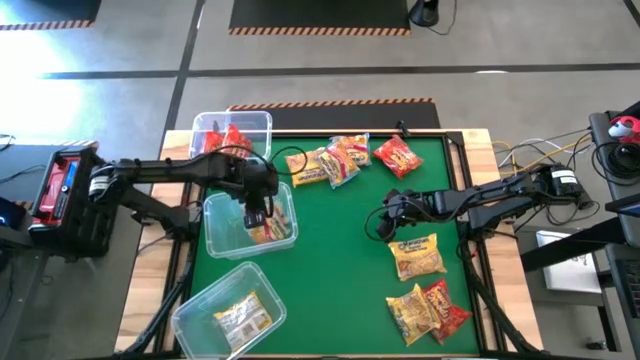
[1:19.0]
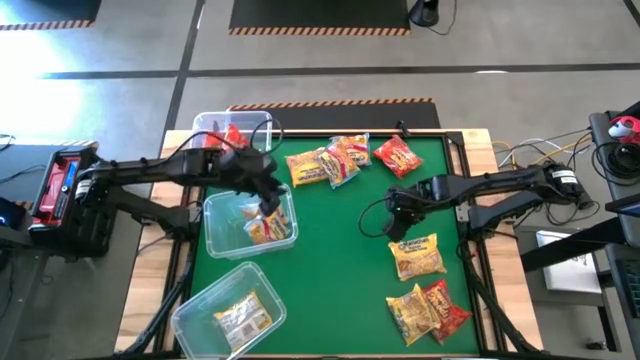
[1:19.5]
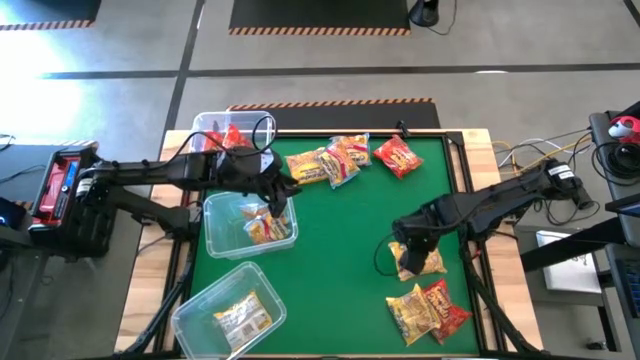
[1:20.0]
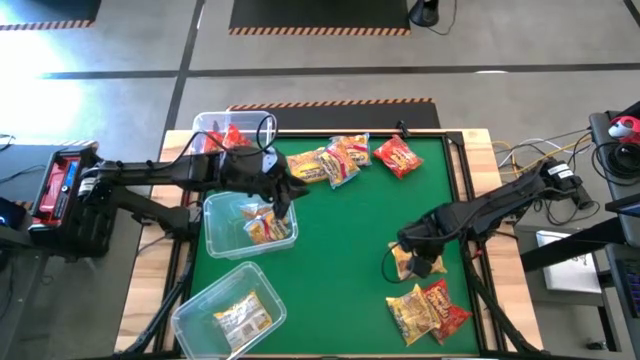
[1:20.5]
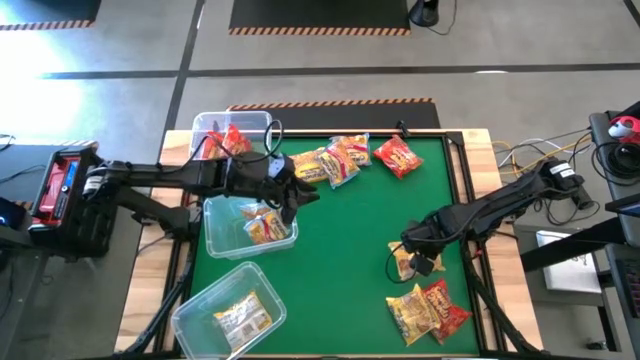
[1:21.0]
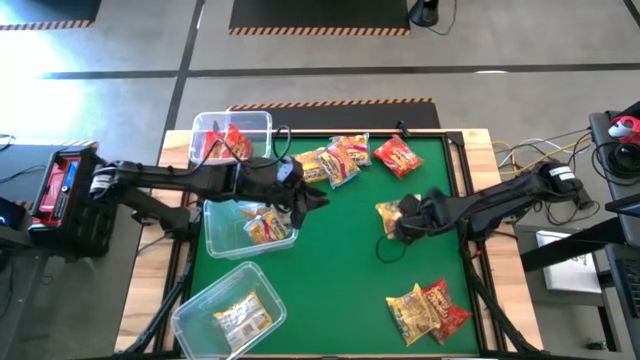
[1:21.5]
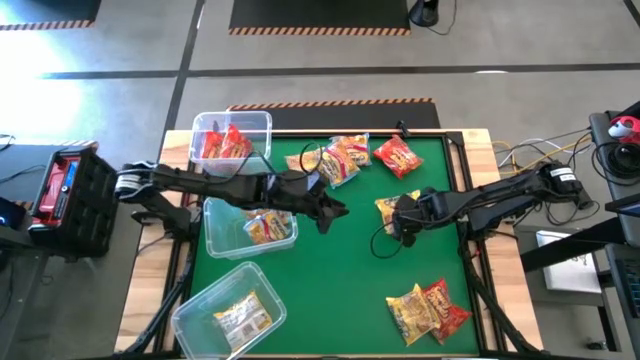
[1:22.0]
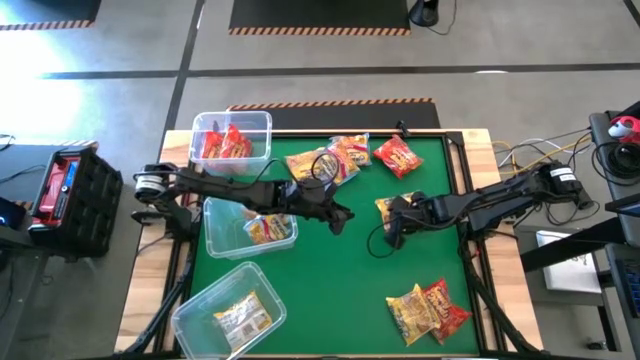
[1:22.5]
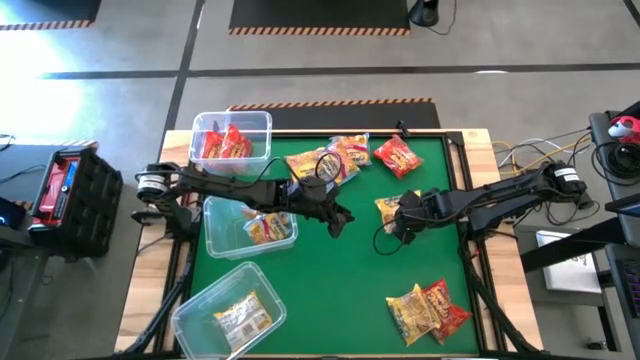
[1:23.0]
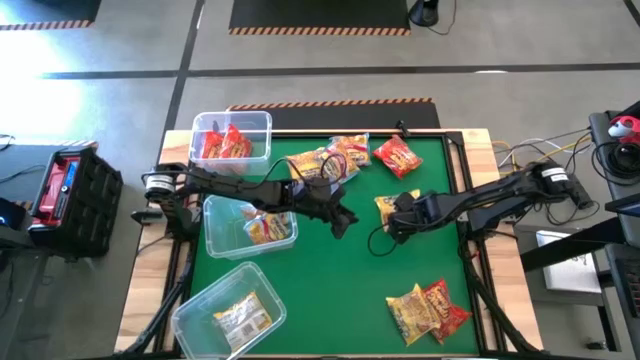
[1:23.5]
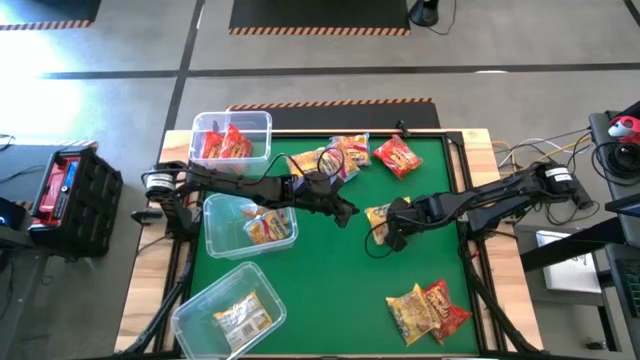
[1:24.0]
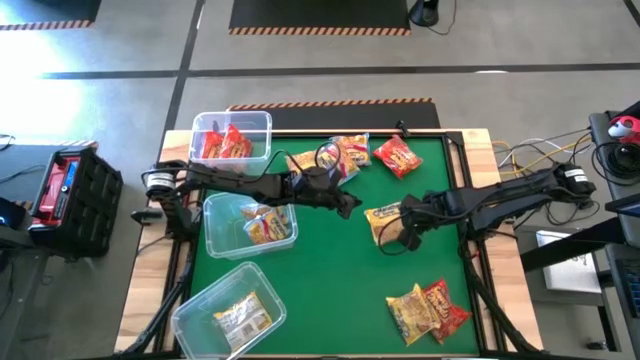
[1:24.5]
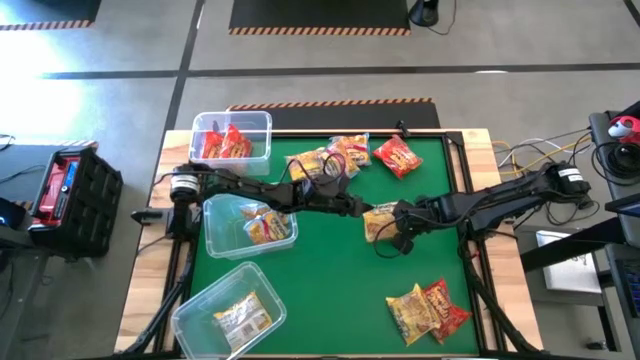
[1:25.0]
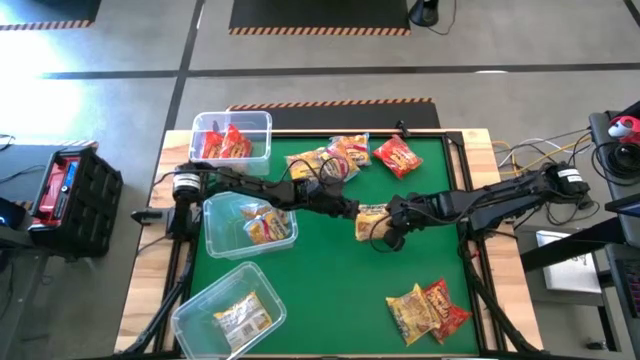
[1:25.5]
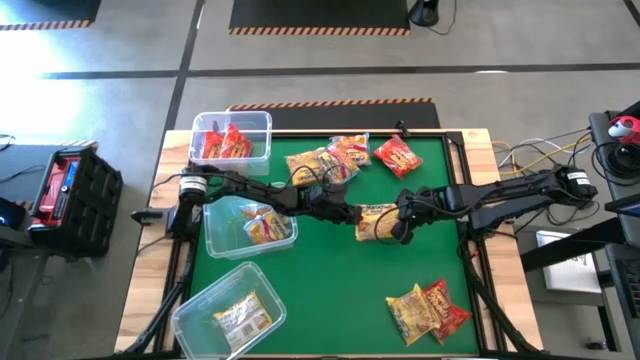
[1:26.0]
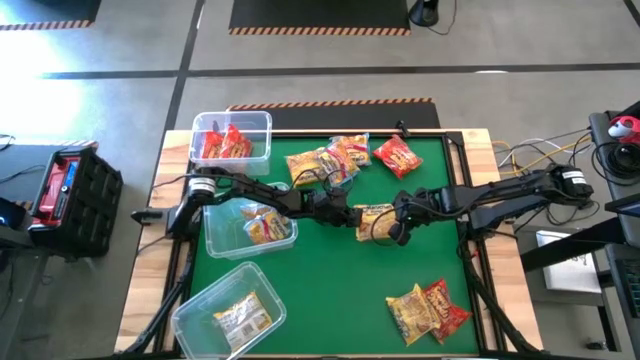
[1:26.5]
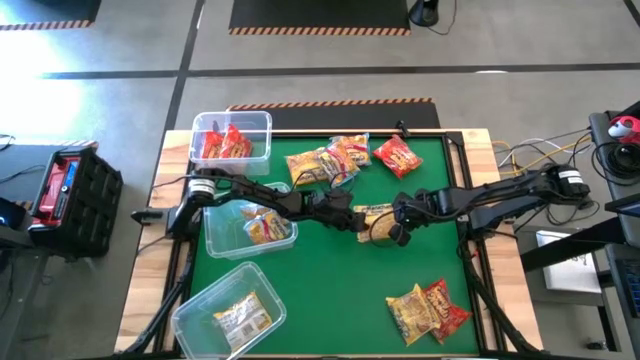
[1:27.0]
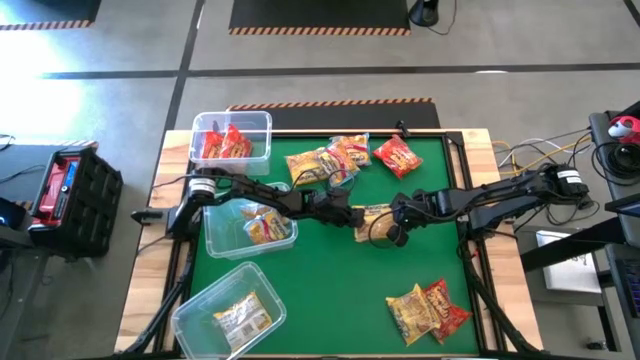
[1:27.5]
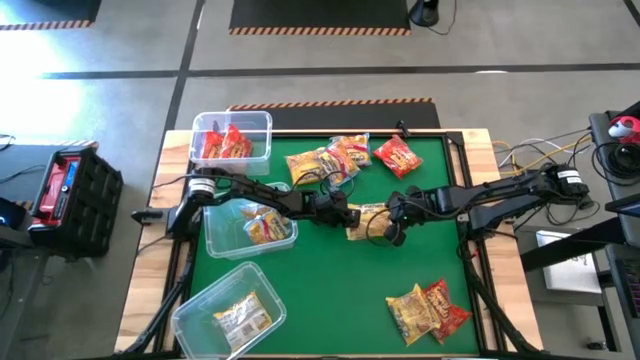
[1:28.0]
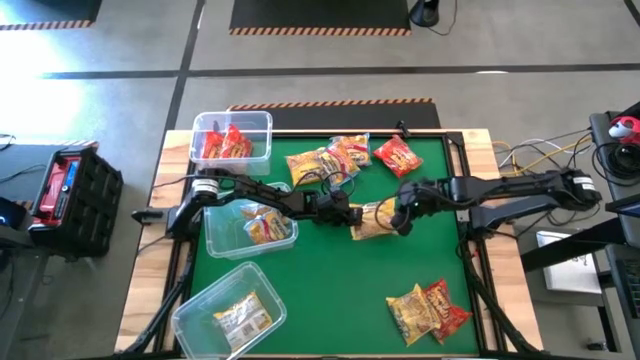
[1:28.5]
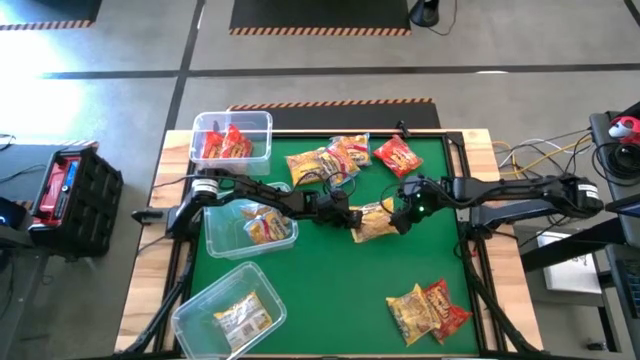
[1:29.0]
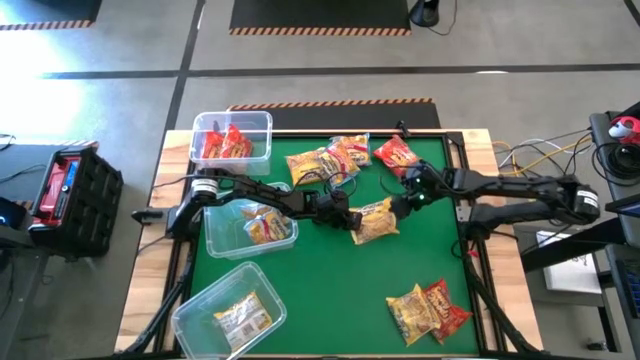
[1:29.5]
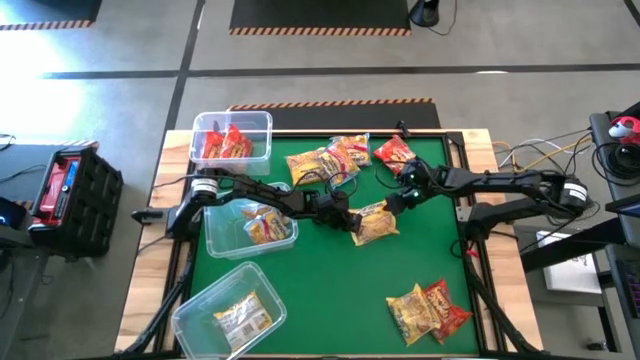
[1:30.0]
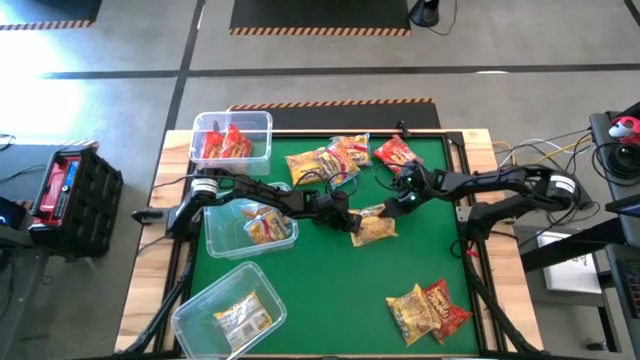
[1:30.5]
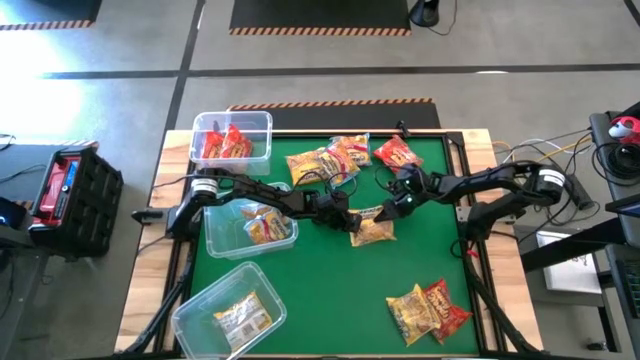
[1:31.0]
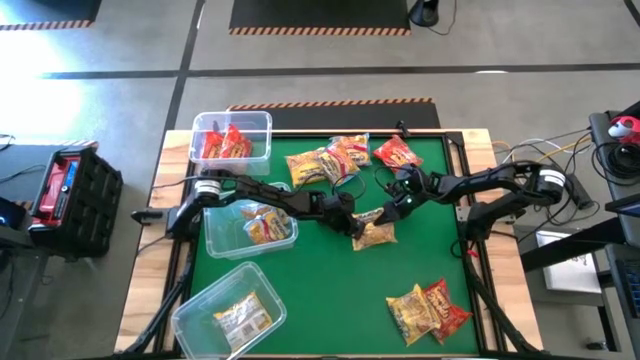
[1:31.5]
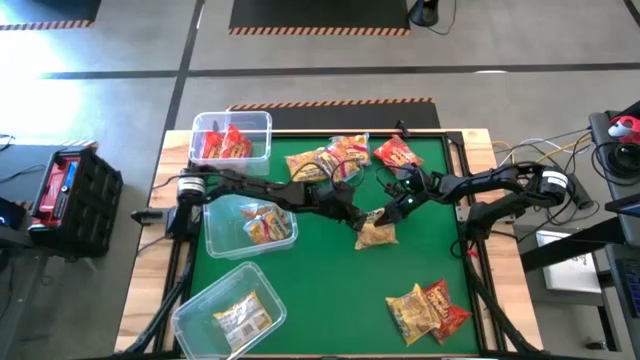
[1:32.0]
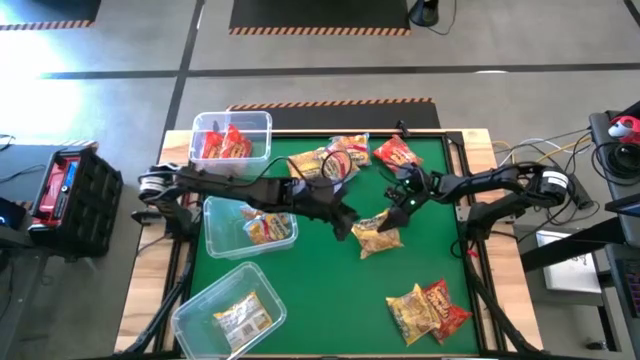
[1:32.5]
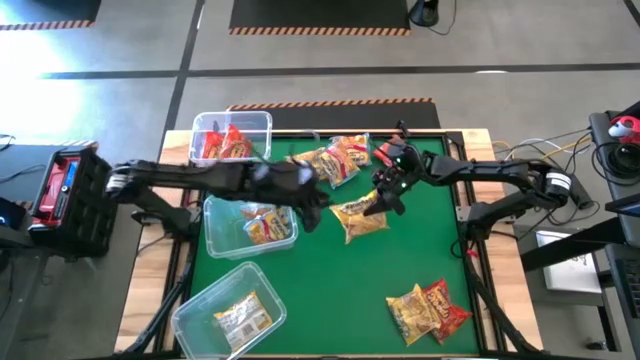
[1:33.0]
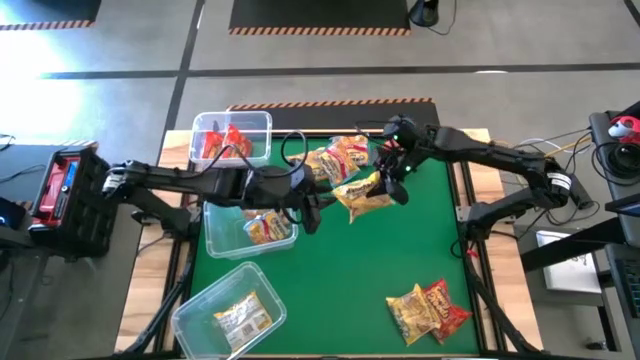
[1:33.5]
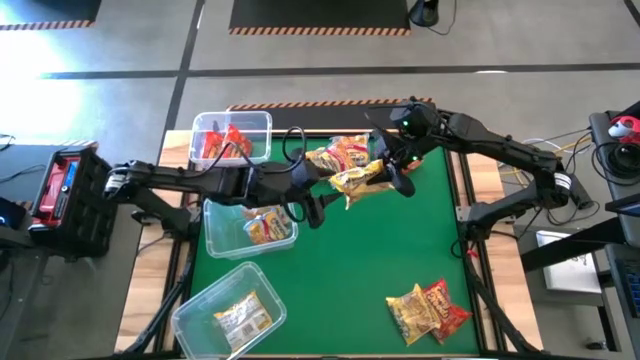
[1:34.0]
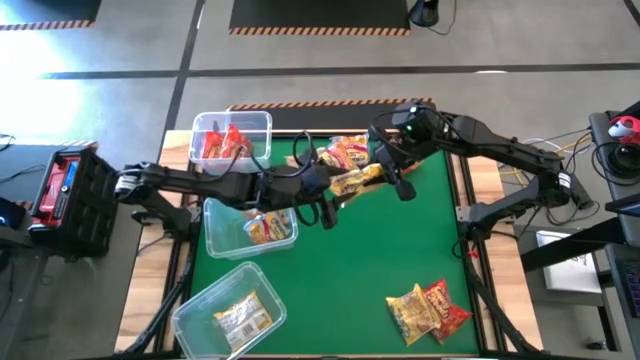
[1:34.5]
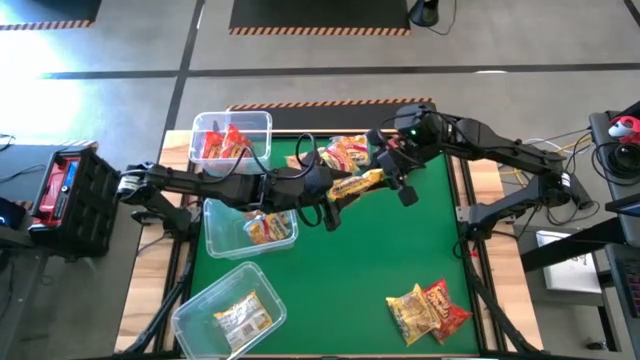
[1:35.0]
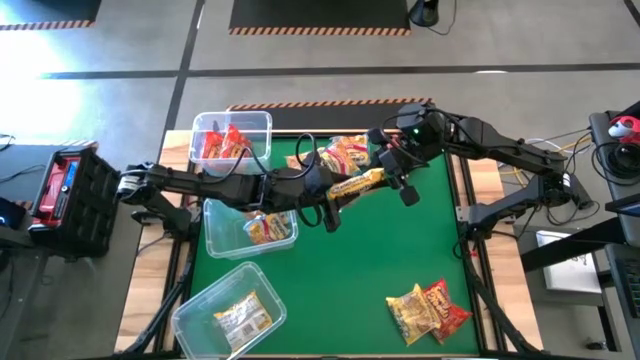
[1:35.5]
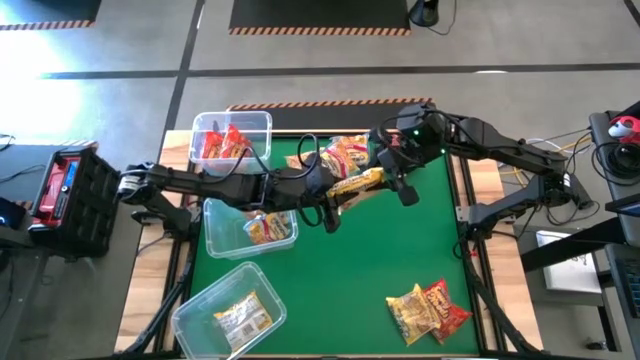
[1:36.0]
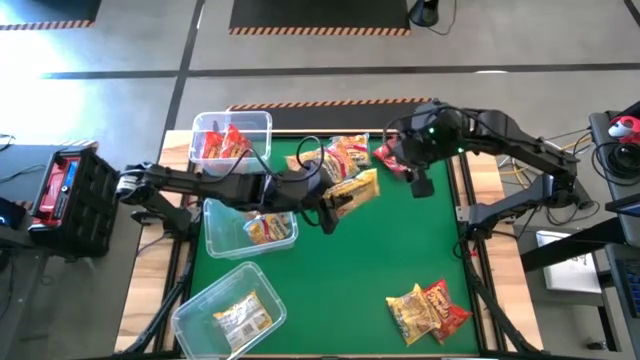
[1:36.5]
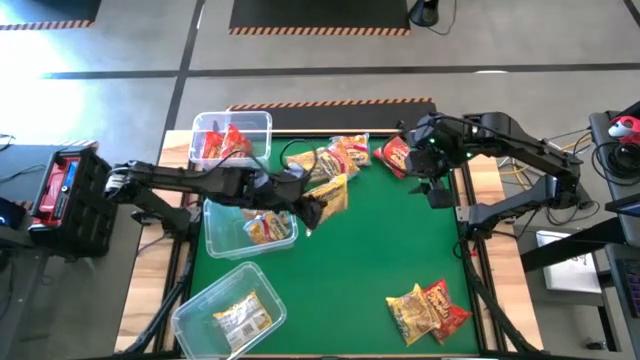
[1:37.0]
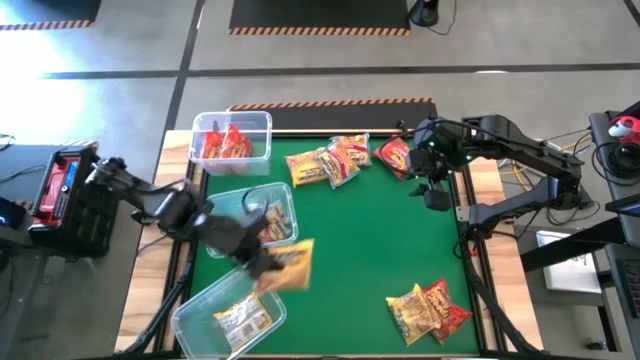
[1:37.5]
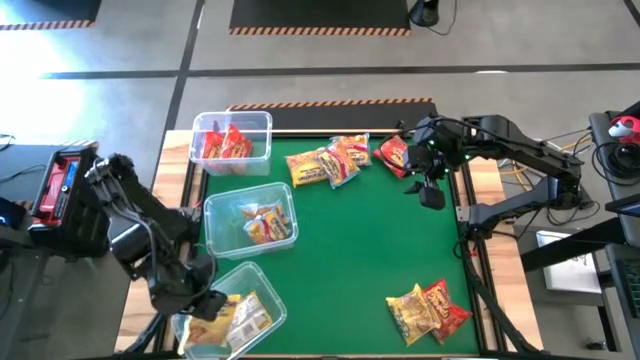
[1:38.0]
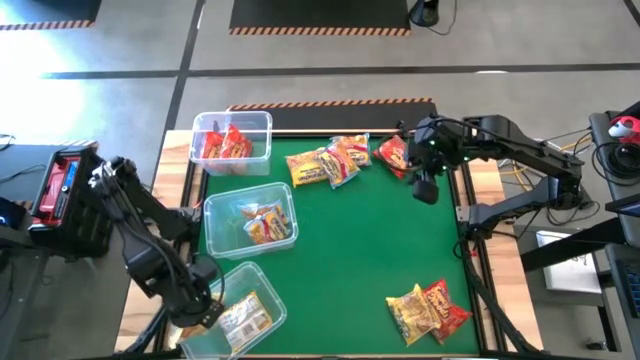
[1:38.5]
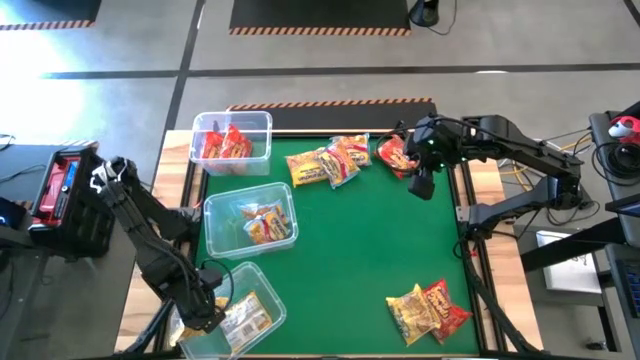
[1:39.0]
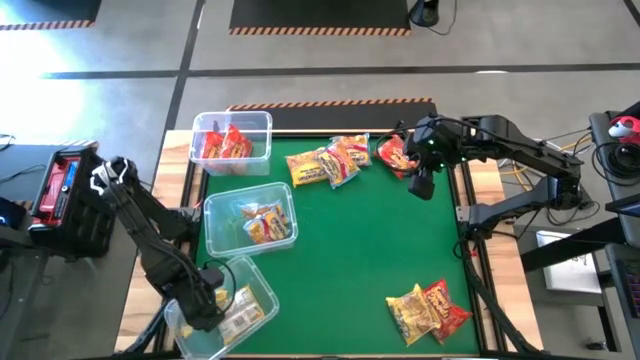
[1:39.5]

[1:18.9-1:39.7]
Task: Sort Maruchan noodles
Put the middle yellow noodle pack into the bottom transparent bin

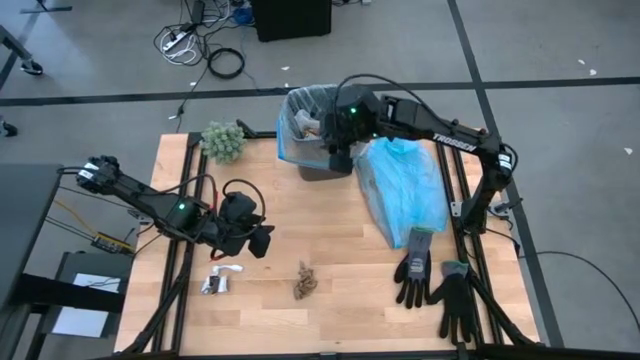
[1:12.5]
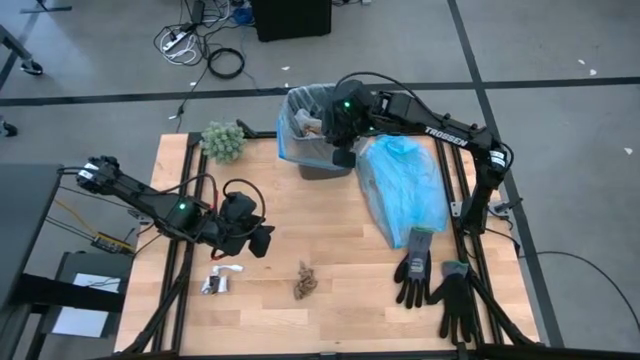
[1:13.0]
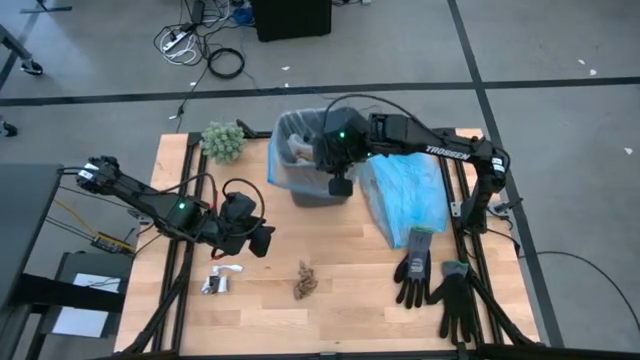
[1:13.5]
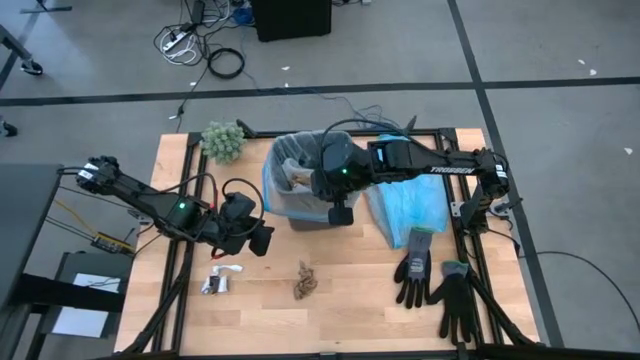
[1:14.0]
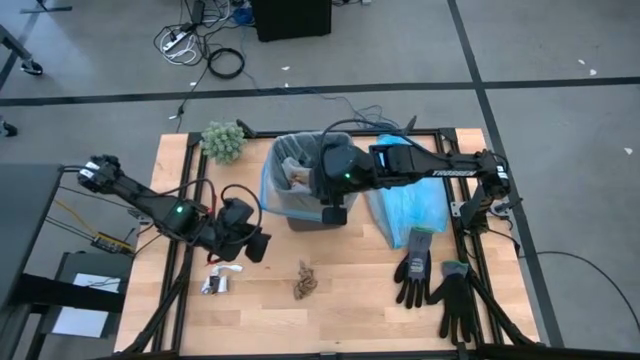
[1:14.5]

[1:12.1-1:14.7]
Task: place trash/remove bag and relplace
Move the trash bin to the center of the table
